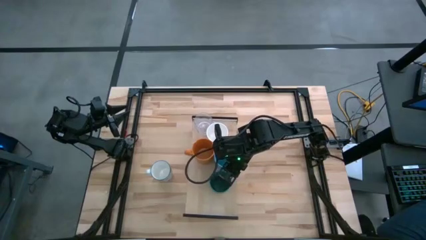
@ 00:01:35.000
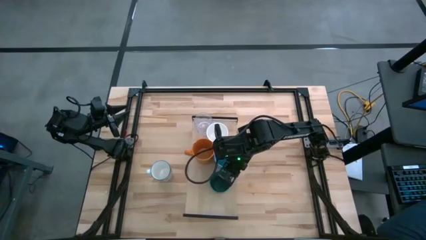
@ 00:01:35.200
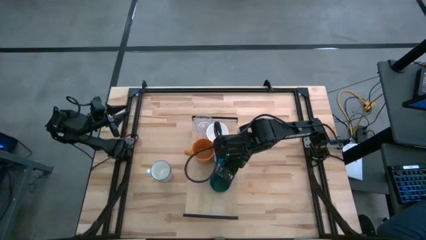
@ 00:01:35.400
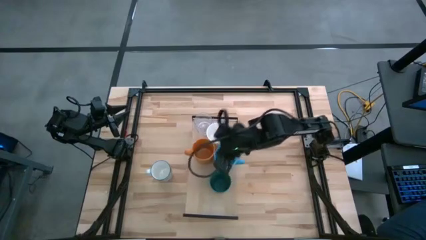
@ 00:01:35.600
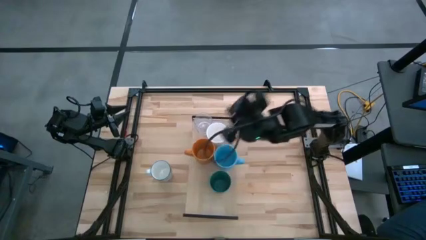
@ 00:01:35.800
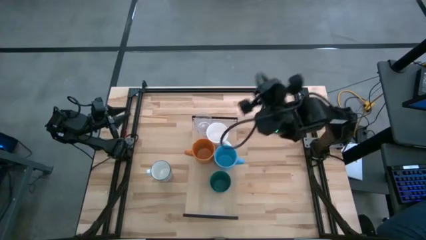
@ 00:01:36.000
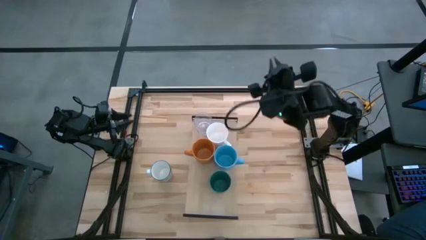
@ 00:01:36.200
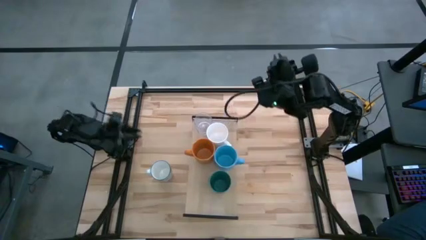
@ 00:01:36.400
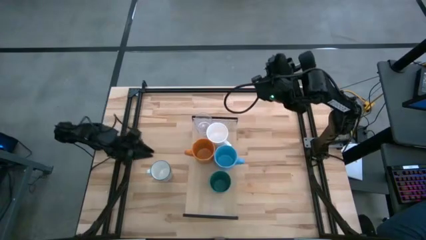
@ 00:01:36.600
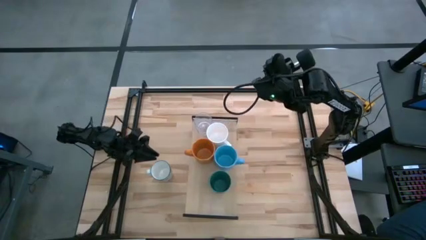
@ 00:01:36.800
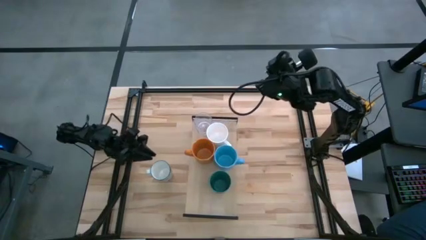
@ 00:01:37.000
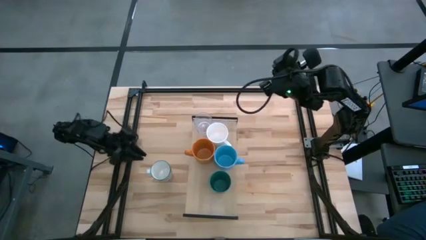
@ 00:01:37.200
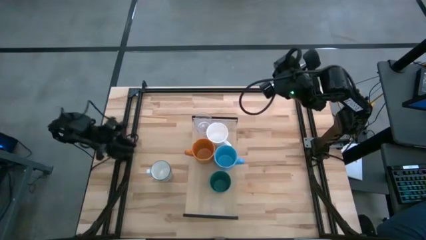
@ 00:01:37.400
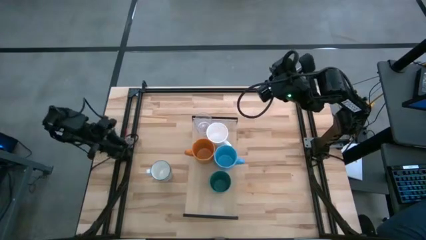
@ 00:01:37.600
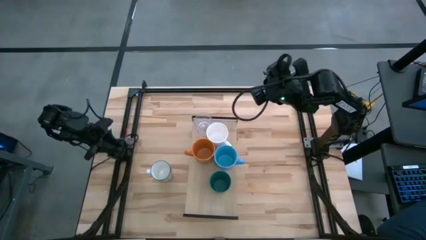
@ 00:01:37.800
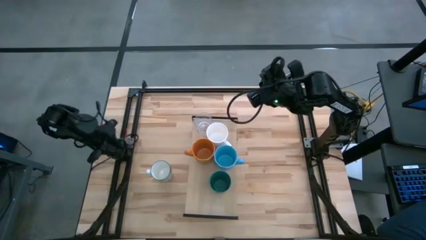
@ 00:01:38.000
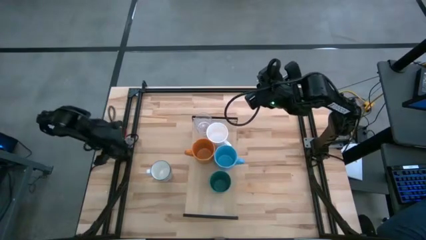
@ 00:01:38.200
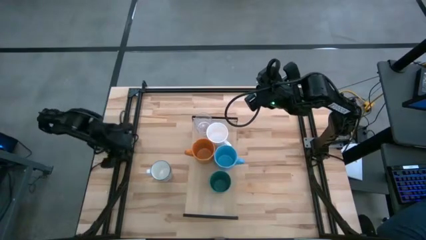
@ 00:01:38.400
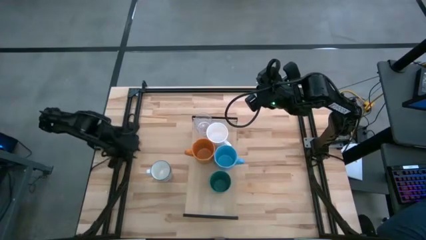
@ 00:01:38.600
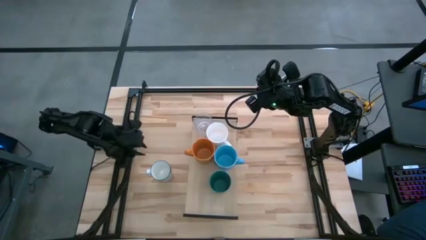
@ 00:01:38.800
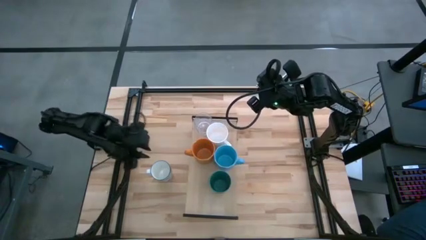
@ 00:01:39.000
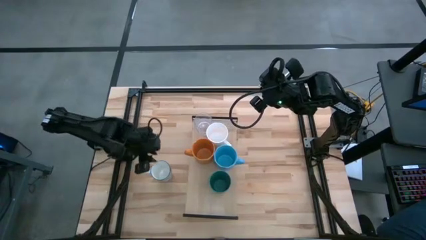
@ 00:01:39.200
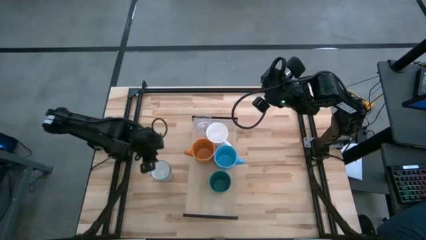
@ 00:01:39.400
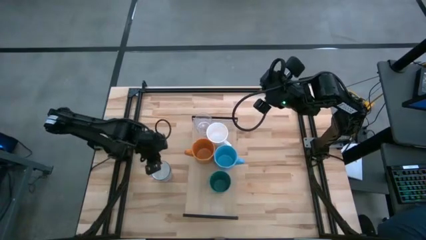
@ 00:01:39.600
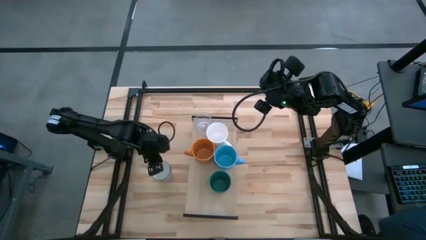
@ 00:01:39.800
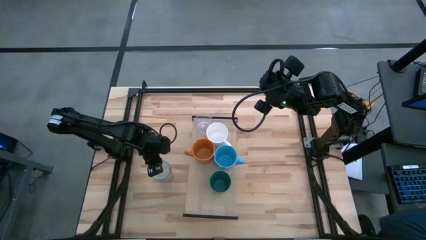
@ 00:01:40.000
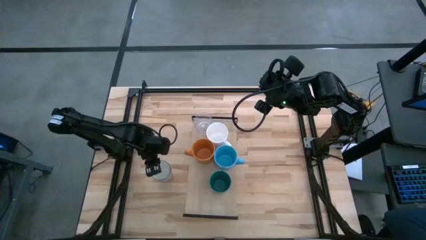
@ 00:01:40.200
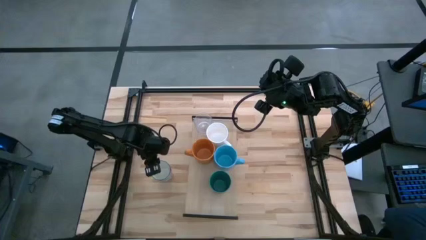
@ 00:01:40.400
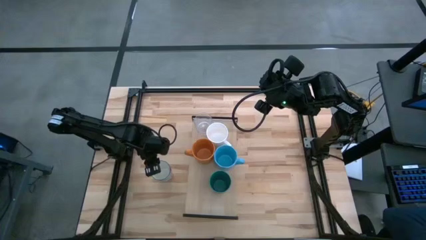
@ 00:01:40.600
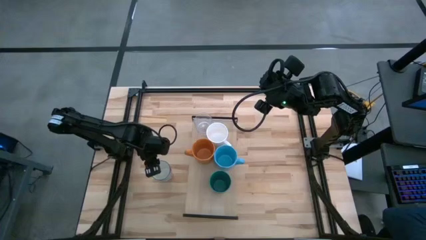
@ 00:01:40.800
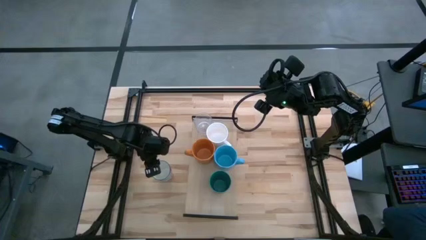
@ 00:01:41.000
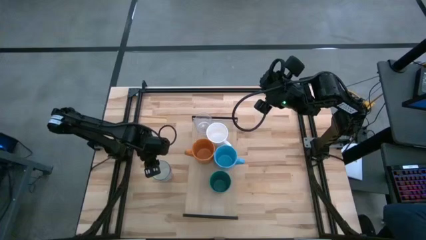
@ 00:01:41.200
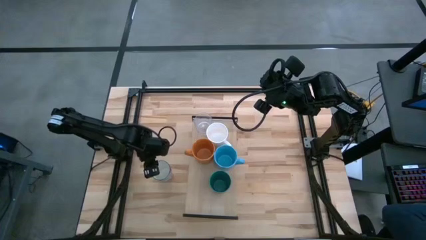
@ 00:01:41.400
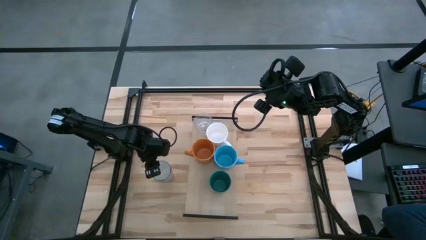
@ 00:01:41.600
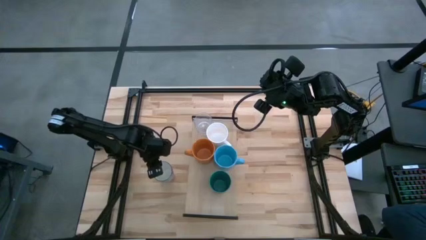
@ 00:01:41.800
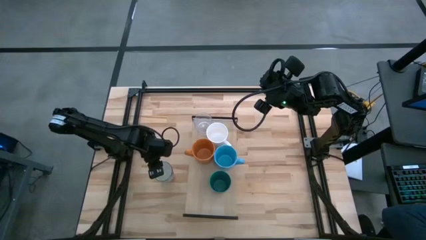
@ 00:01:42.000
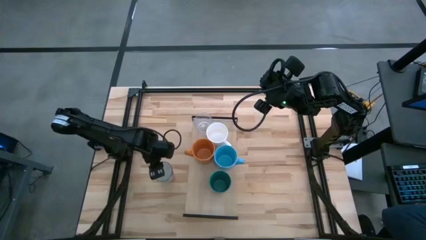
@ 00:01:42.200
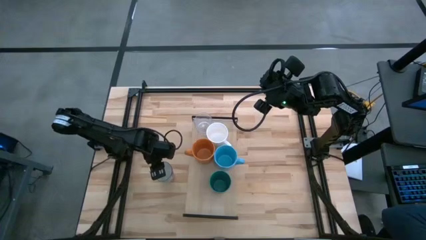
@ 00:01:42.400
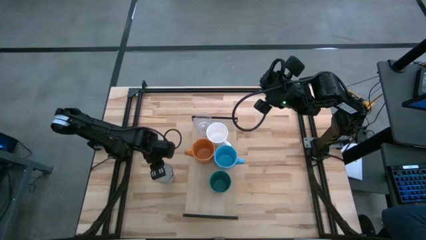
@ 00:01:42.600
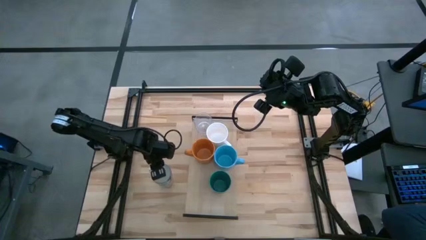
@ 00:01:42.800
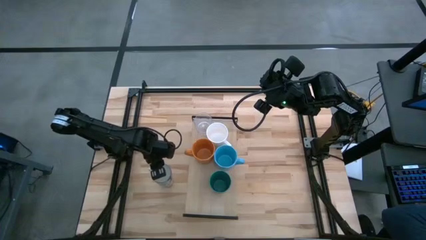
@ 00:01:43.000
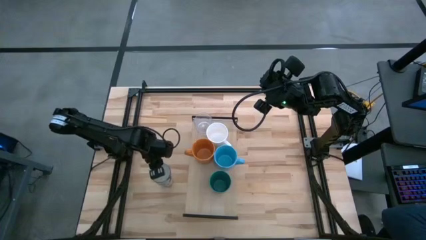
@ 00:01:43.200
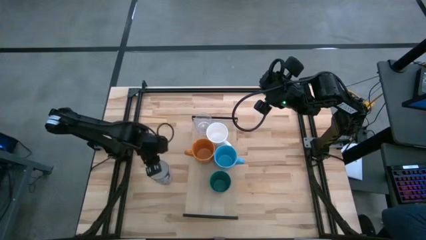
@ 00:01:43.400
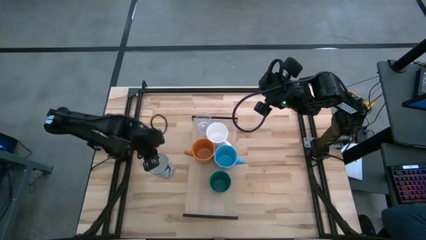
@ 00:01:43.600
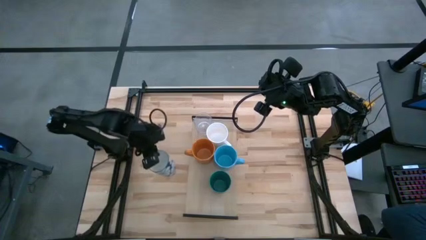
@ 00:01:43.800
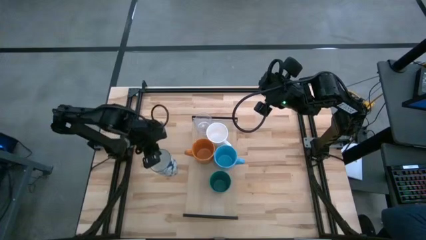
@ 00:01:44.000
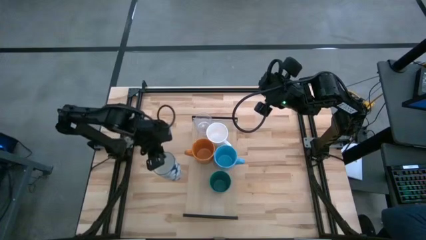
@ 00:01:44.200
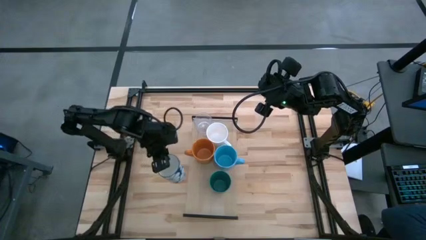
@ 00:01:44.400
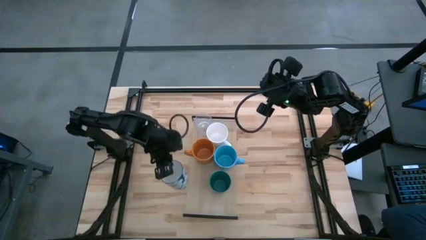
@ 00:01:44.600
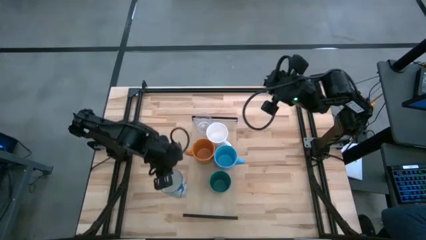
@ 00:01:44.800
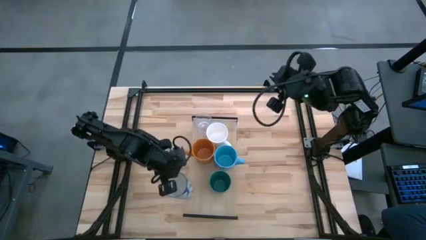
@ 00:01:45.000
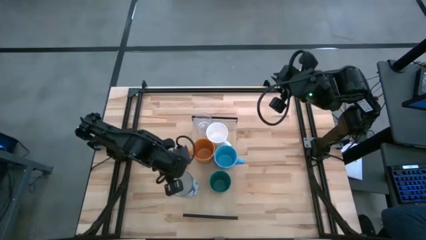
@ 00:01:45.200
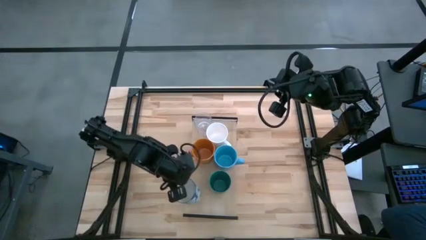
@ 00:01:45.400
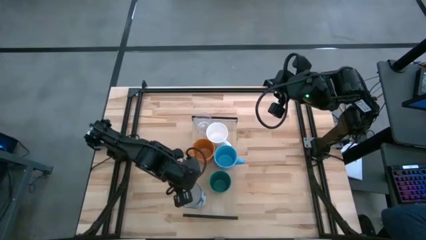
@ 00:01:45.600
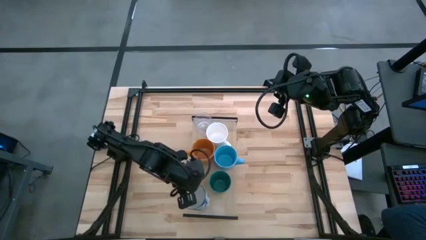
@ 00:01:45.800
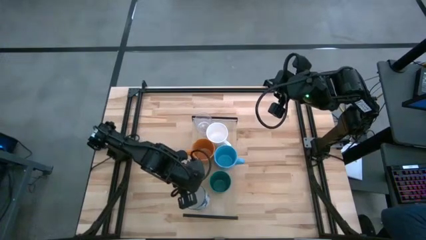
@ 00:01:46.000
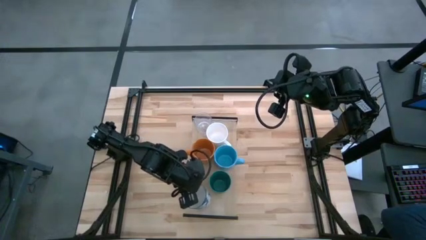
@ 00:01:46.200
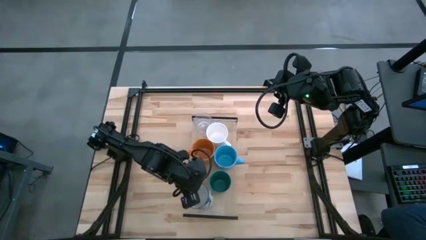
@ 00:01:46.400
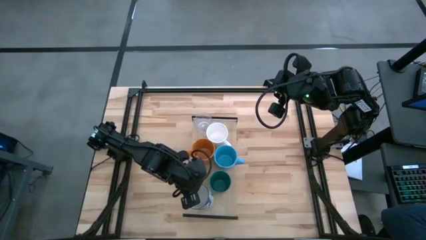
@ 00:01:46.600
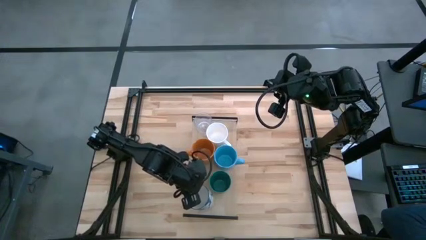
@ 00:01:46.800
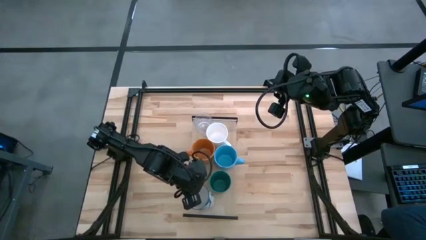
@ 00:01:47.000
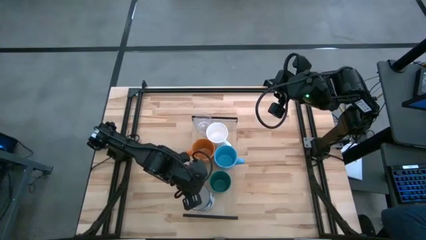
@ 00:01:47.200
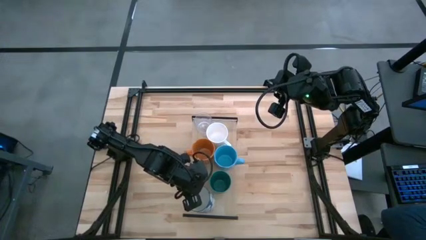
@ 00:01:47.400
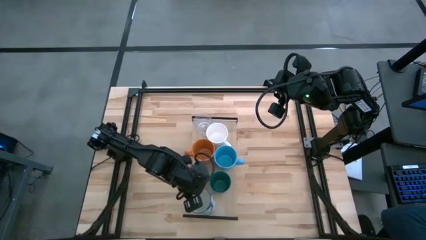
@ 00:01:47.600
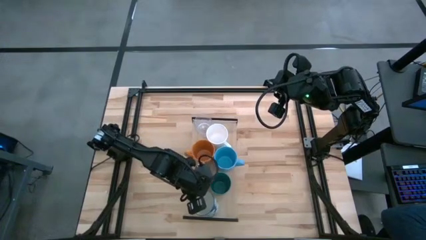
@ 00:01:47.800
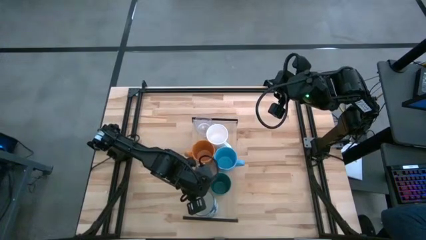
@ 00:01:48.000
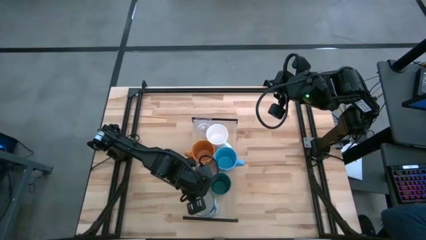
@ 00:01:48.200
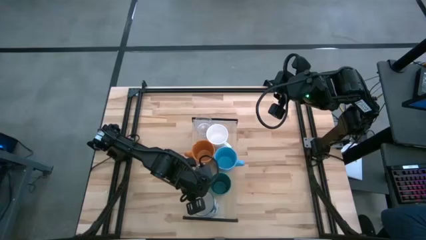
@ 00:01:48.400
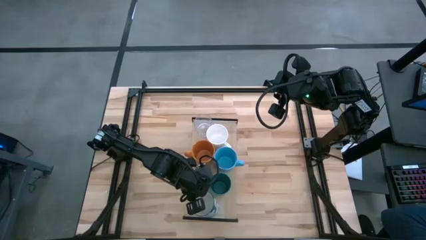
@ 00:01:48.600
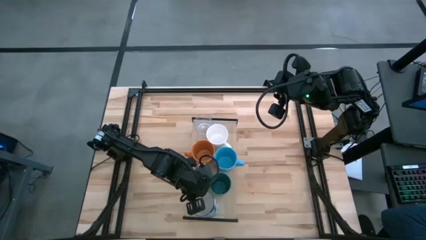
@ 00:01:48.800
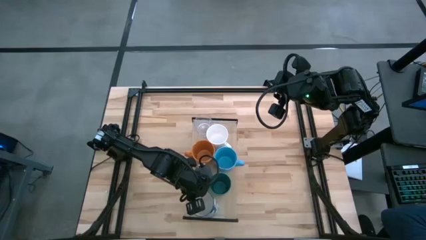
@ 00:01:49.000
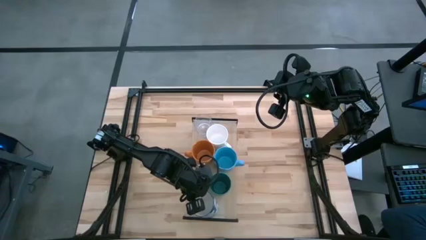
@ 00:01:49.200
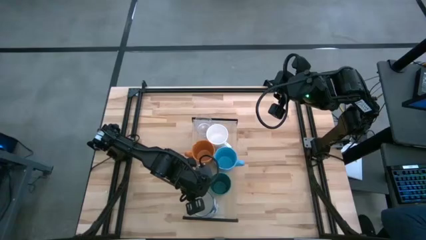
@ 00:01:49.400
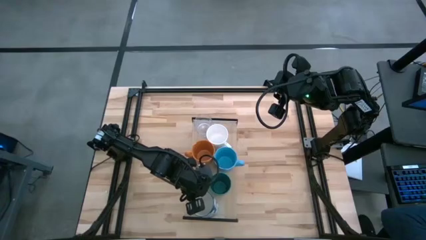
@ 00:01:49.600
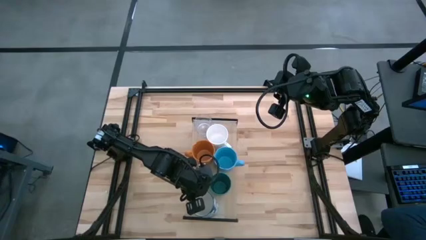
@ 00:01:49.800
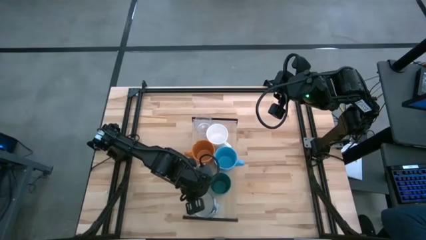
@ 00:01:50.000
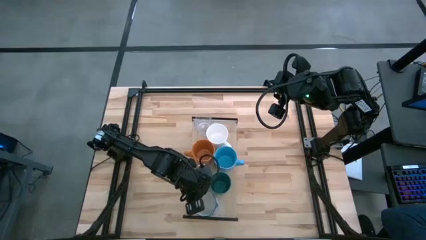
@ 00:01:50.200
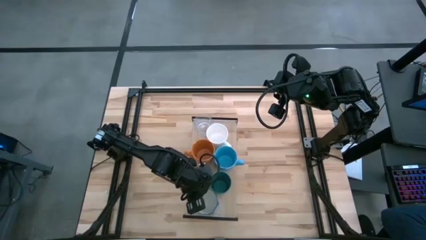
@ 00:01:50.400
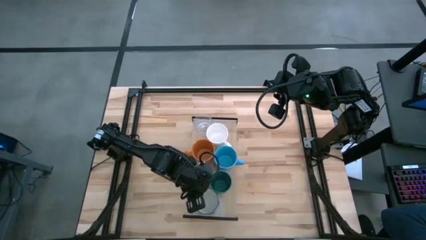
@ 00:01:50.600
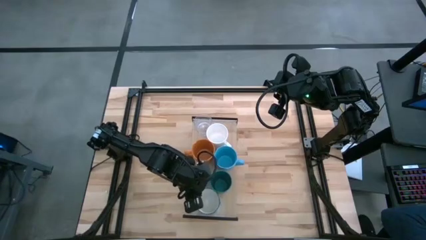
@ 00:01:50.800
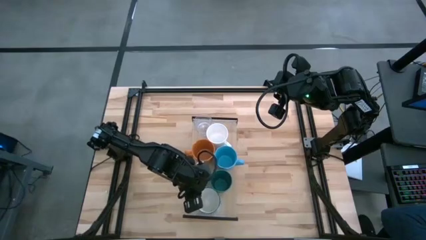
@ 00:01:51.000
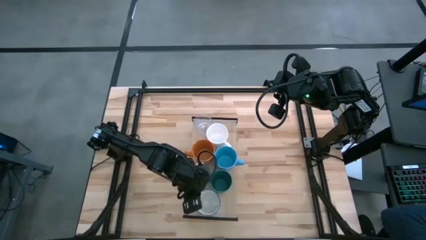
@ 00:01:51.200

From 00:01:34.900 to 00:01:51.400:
Task: Stack small to large cups/mugs on shelf
Put the white and blue mug on the shelf
